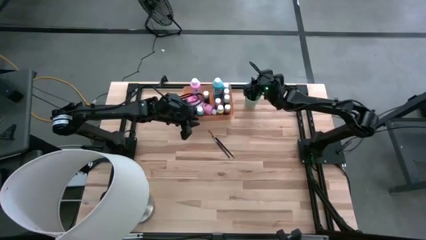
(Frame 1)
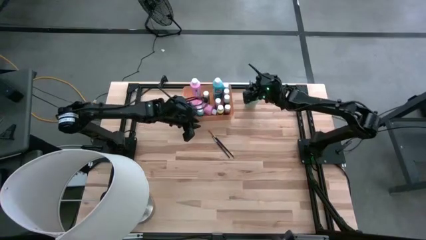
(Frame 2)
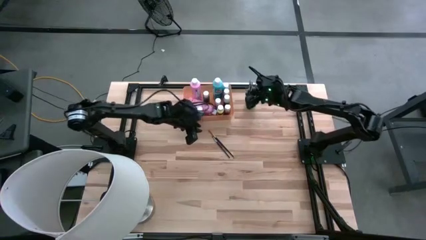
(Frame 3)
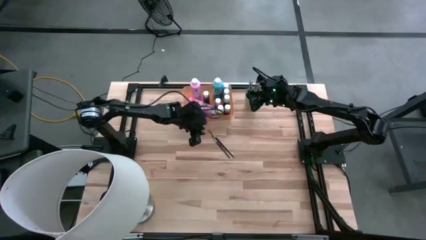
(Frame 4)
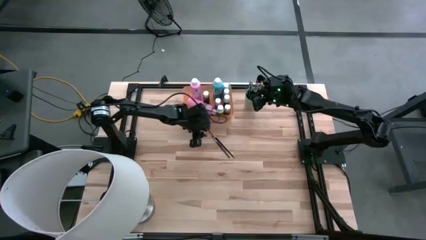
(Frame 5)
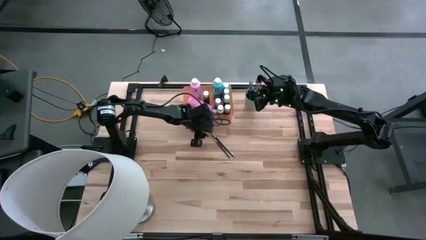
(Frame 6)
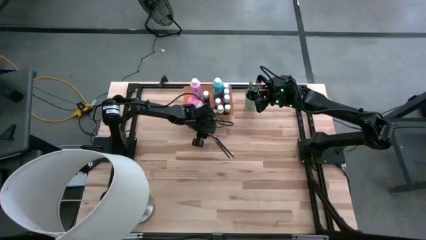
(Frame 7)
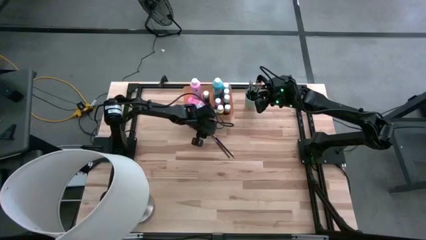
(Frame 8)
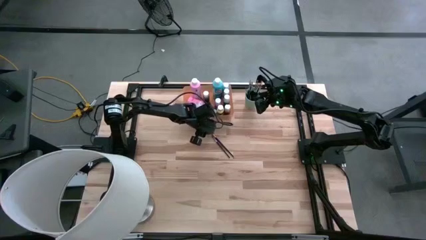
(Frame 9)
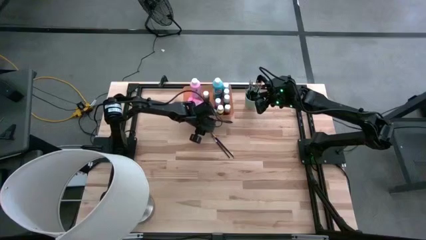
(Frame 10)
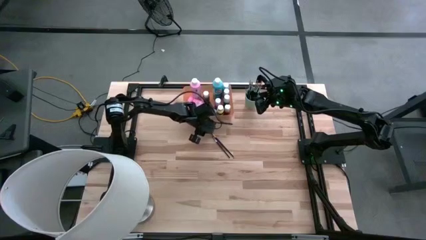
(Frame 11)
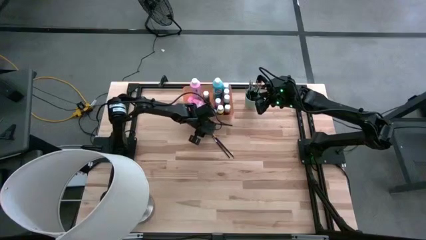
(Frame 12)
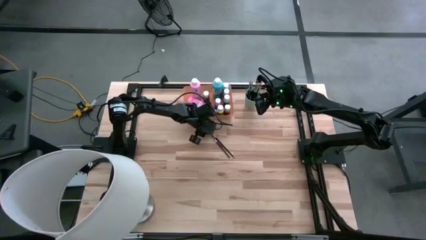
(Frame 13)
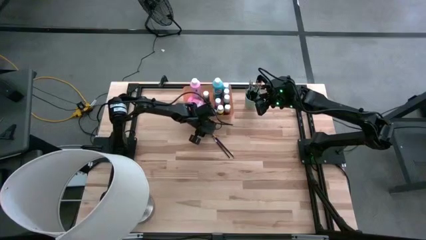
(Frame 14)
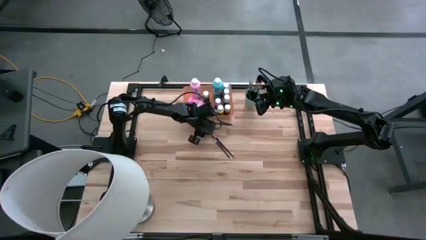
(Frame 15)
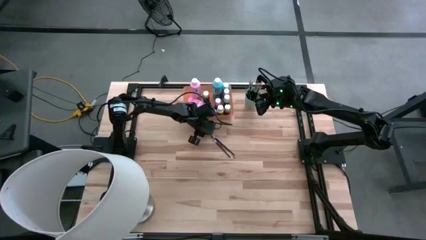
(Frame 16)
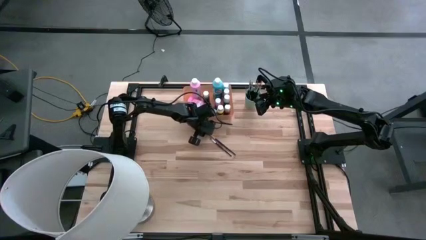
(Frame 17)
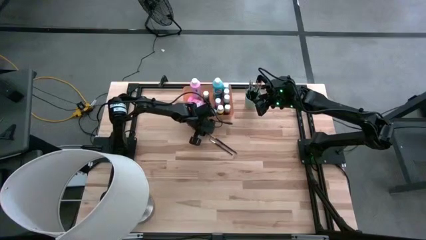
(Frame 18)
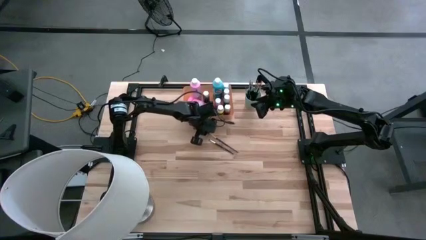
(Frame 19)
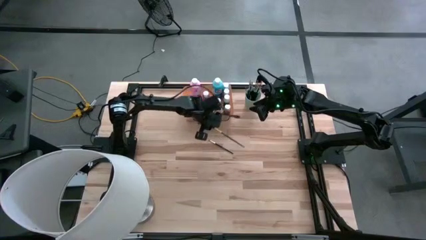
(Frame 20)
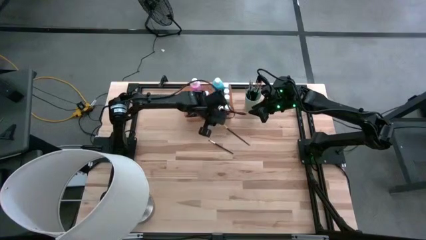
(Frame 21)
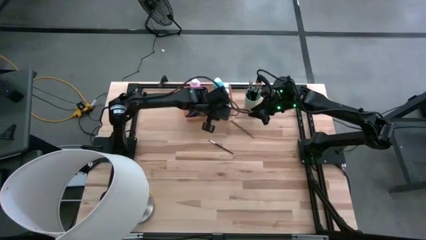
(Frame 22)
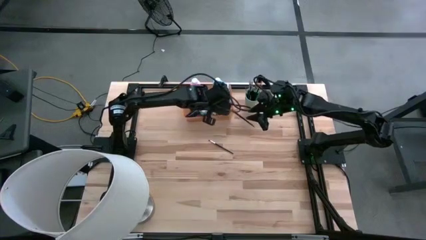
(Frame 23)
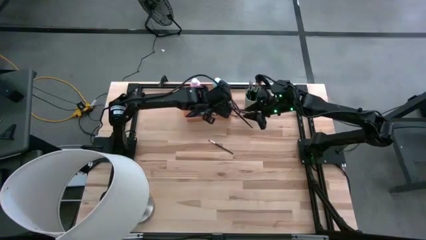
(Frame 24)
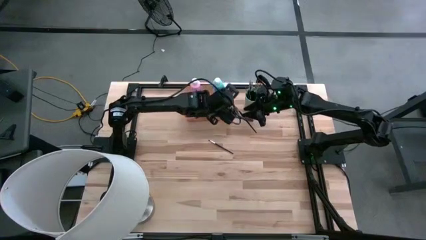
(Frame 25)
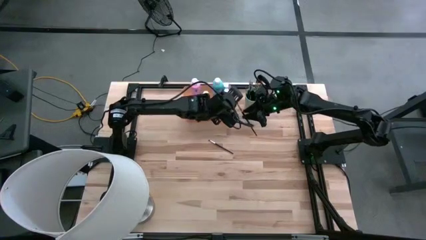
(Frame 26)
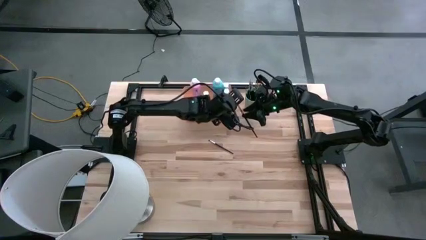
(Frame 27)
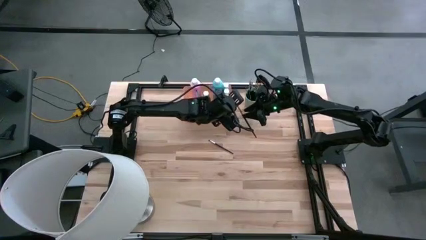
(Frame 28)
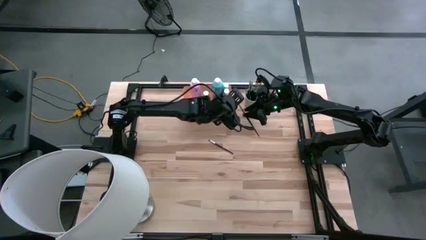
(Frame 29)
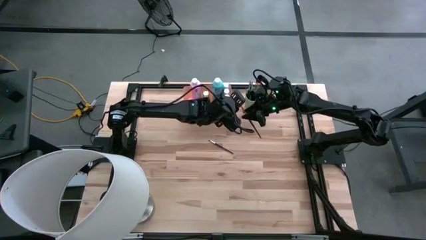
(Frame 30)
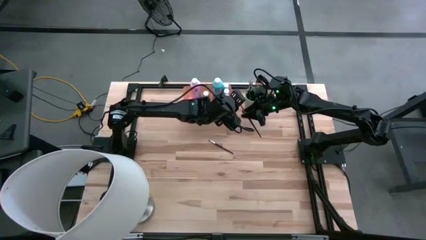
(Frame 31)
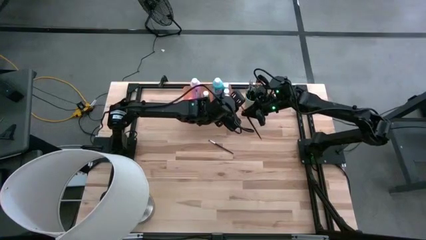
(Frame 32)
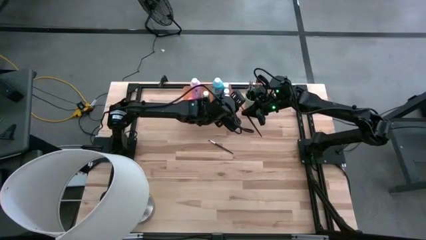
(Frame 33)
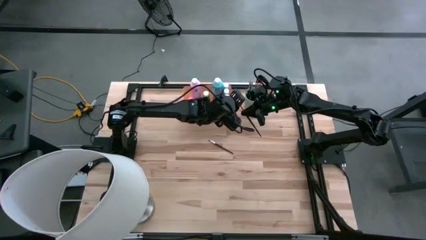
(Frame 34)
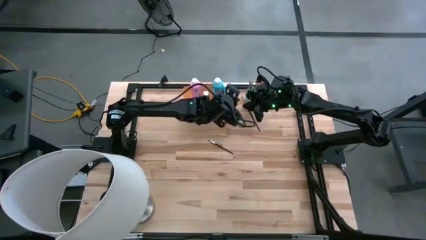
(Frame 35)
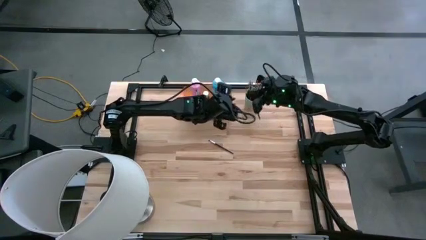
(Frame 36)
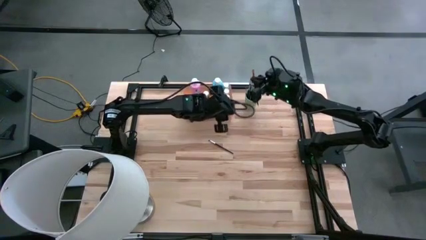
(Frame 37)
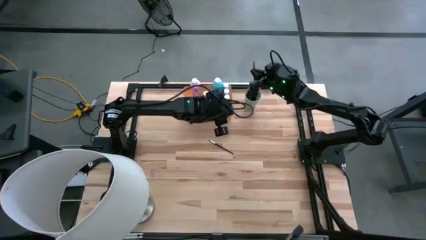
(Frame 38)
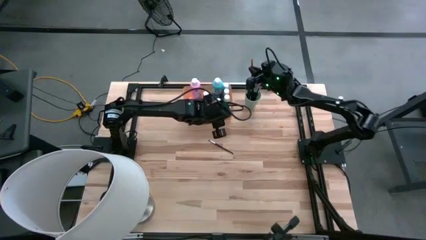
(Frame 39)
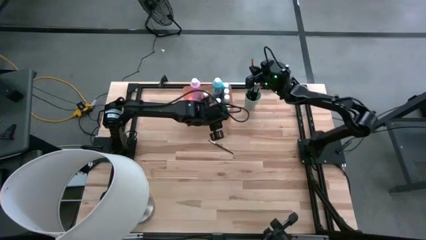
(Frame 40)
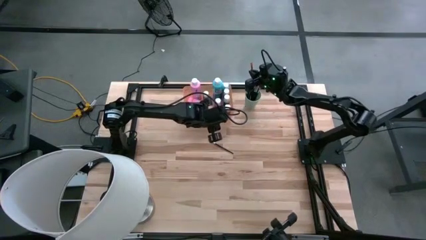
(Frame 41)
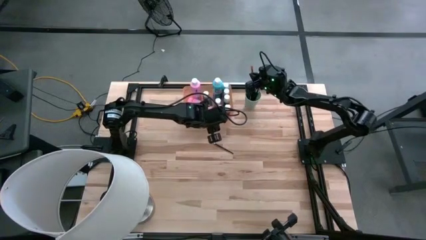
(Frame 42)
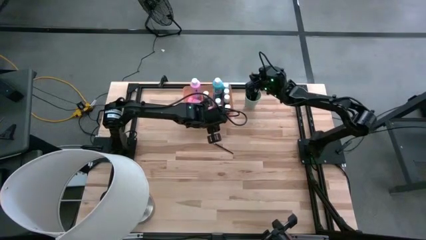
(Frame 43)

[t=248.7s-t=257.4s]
Task: Pick & Place Paint Supplies
Put the yellow paint brush into the green cup

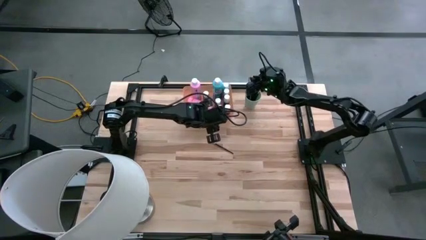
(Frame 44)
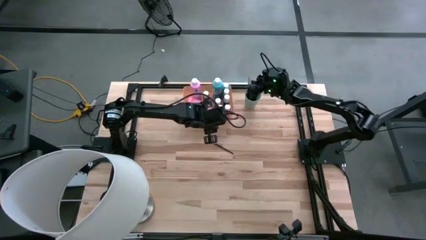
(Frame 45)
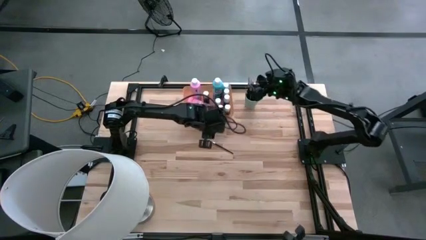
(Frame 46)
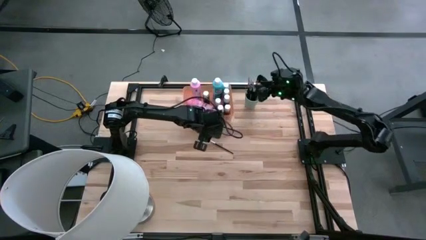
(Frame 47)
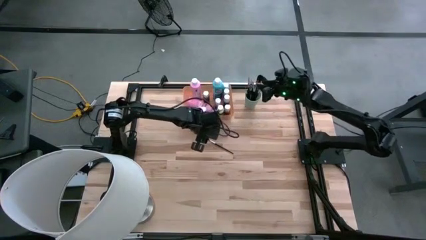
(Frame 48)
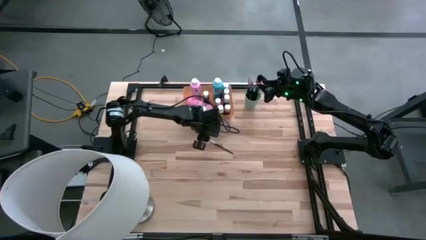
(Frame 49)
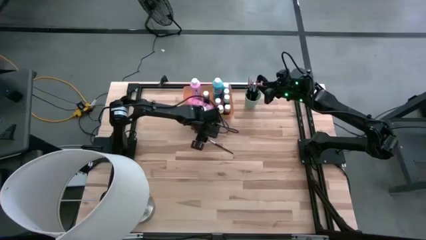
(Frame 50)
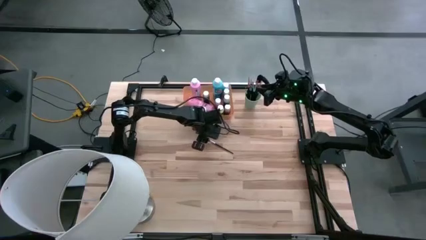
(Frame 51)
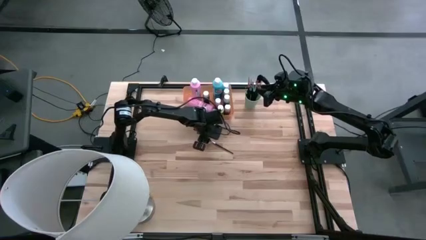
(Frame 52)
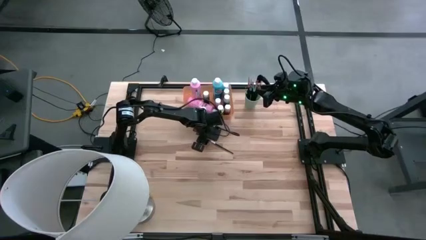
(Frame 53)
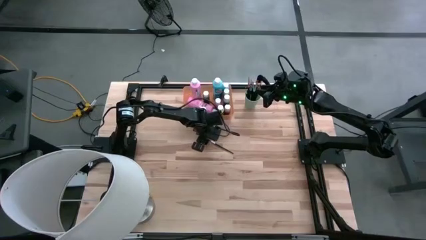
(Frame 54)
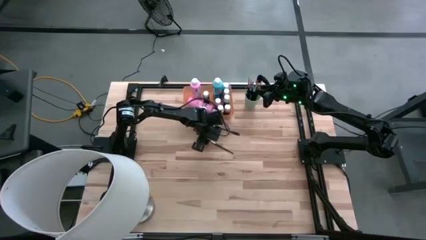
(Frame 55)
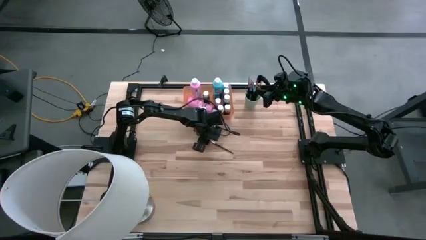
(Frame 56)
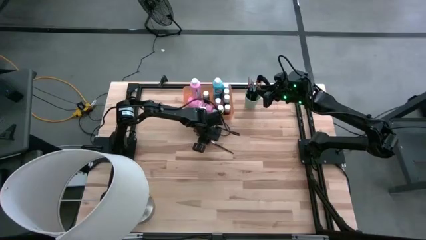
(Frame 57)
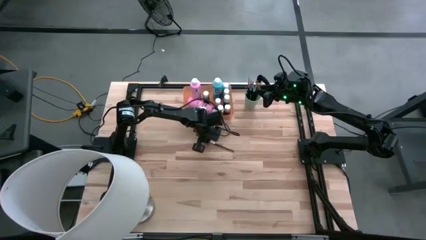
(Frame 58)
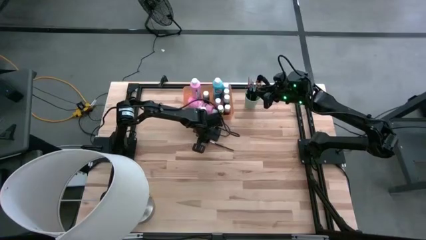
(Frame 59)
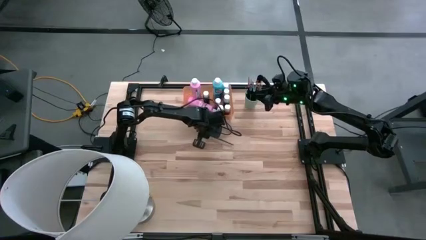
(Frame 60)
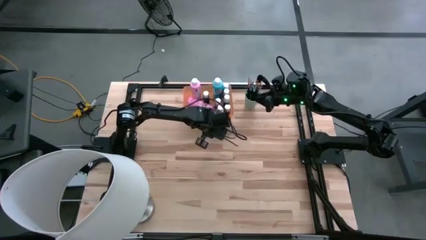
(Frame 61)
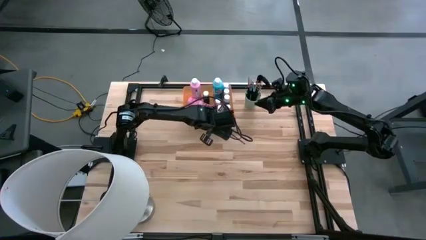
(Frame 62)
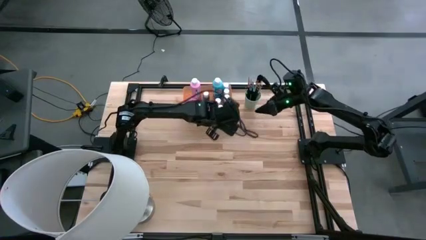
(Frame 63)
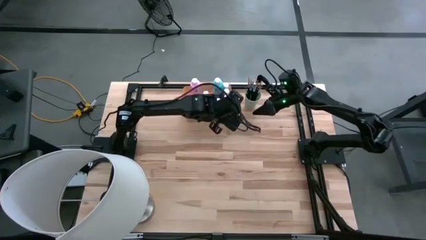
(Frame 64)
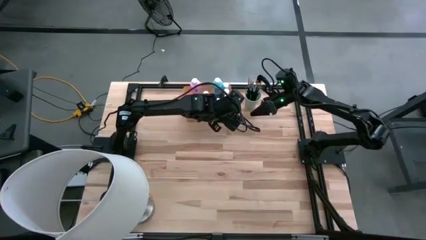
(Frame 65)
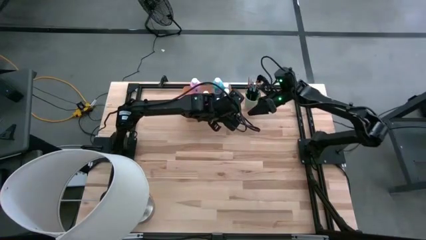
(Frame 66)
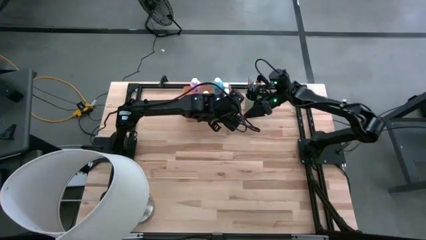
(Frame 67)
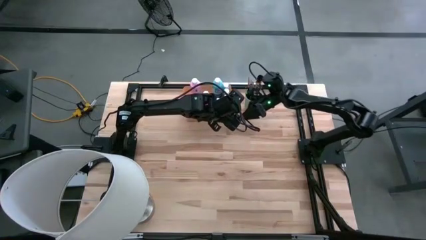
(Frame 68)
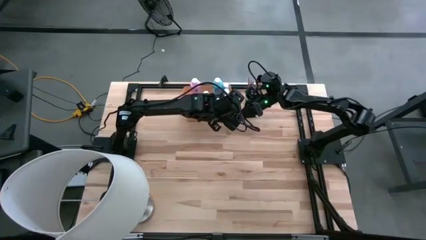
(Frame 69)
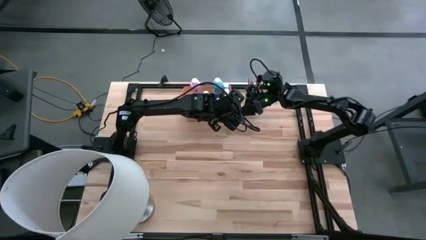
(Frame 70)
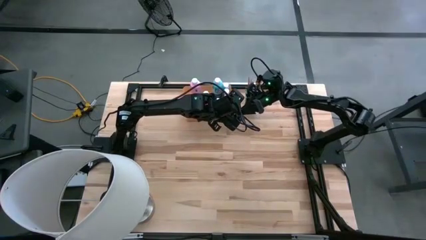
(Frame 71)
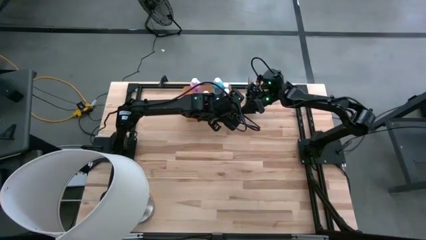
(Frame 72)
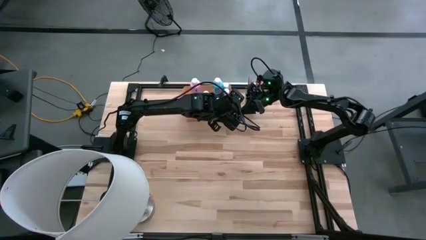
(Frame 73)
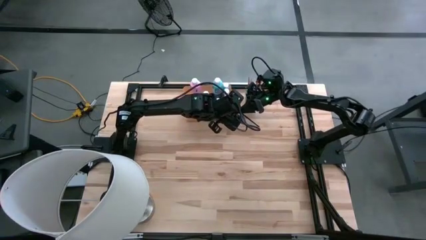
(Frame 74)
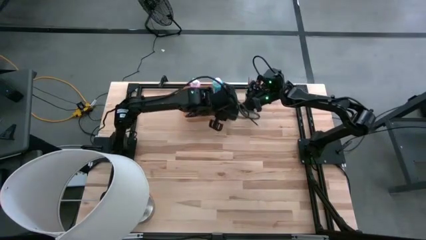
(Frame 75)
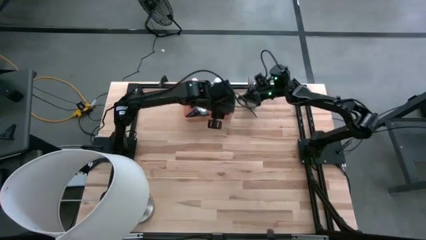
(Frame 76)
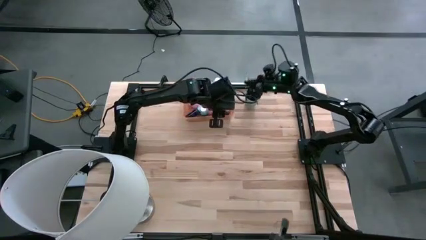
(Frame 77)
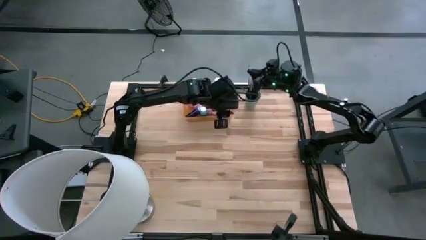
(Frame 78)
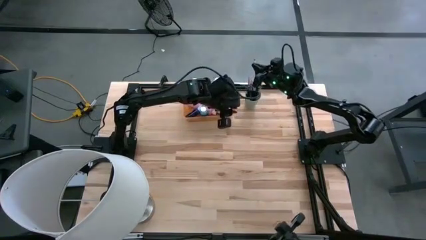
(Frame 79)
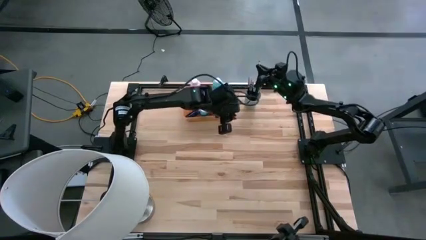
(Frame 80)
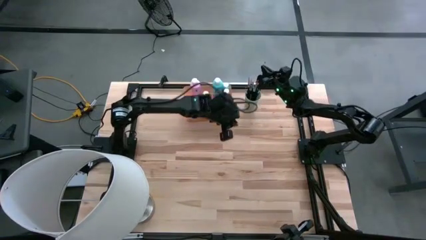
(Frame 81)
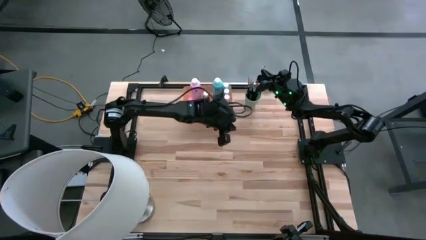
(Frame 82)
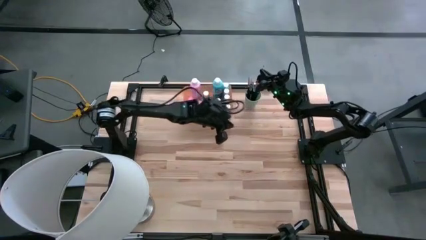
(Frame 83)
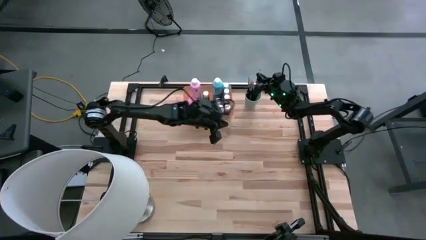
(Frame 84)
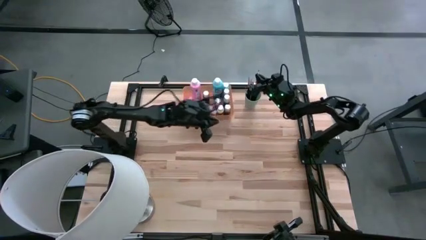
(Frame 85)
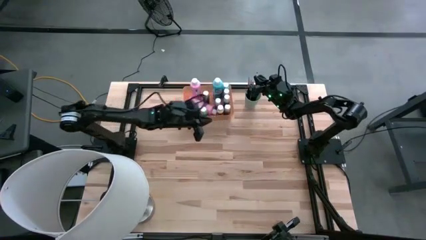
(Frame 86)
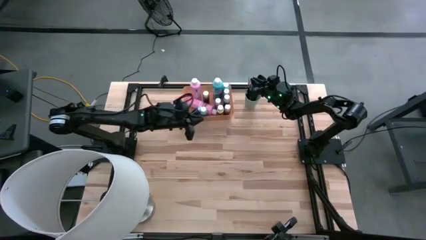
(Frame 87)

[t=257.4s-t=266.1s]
Put the silver paint brush into the green cup
